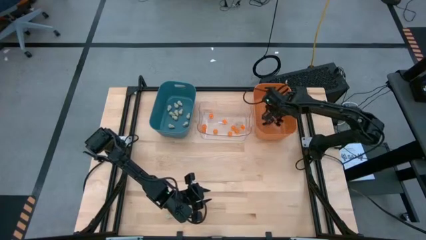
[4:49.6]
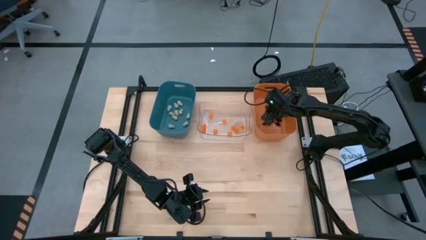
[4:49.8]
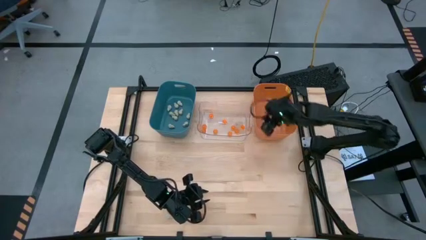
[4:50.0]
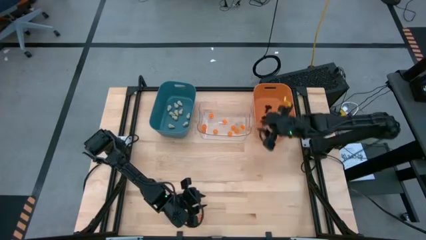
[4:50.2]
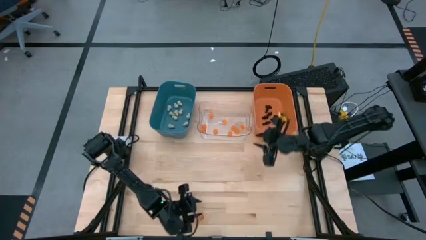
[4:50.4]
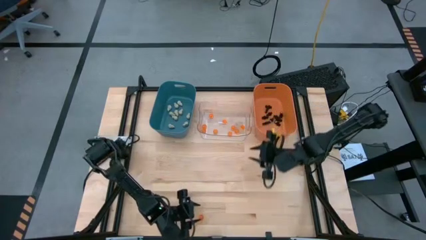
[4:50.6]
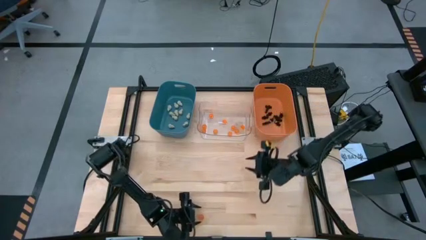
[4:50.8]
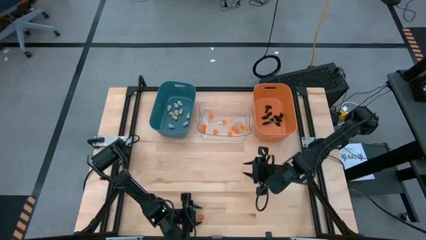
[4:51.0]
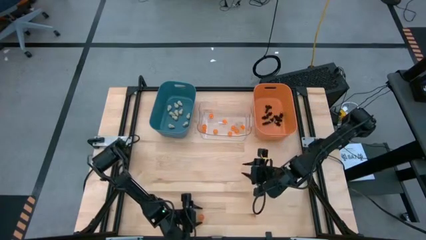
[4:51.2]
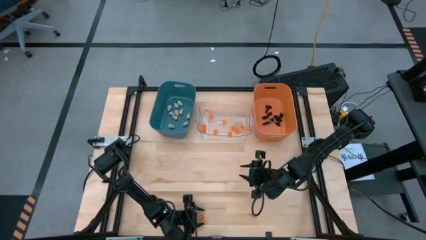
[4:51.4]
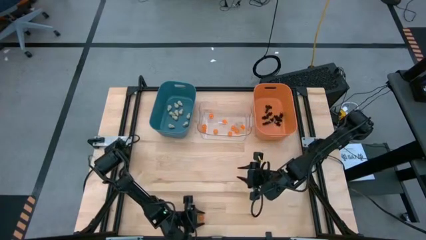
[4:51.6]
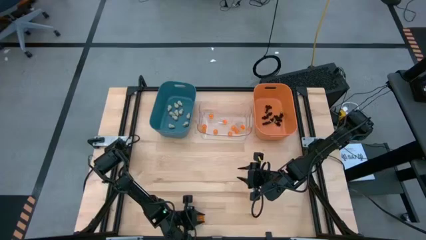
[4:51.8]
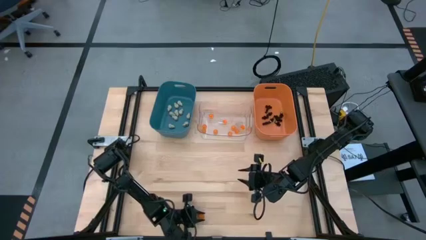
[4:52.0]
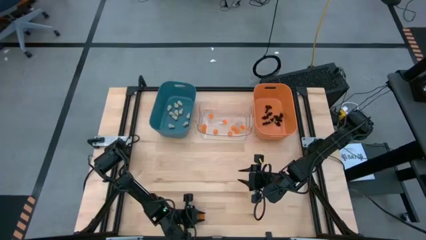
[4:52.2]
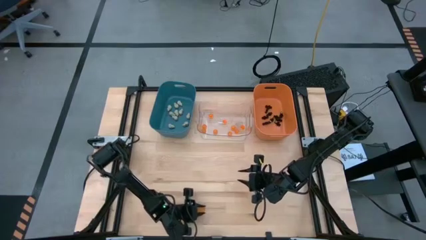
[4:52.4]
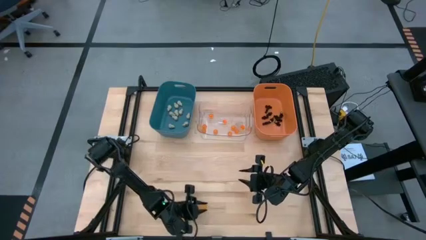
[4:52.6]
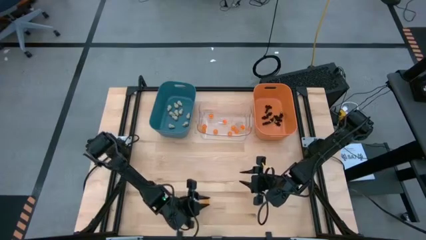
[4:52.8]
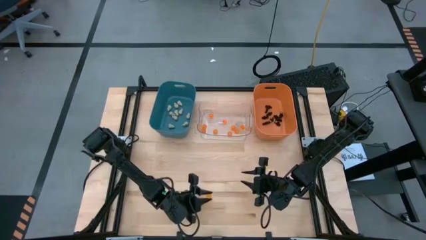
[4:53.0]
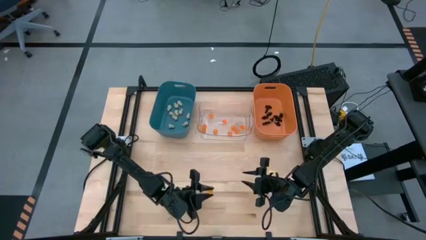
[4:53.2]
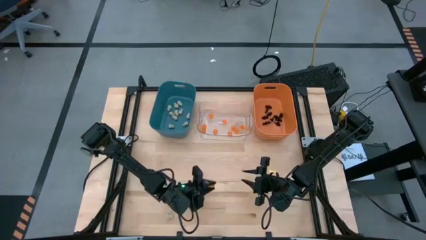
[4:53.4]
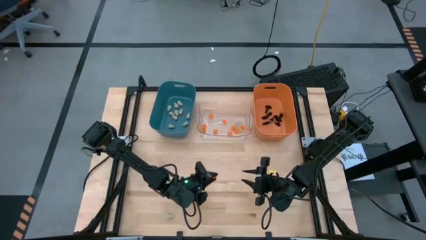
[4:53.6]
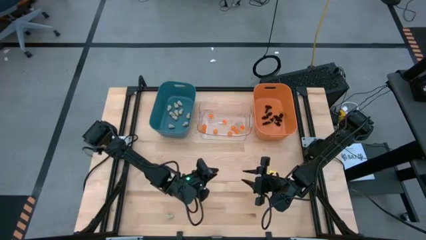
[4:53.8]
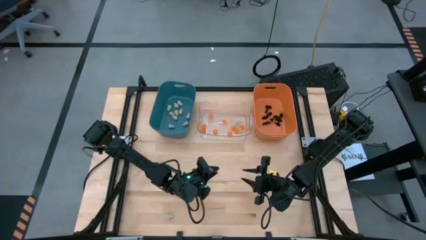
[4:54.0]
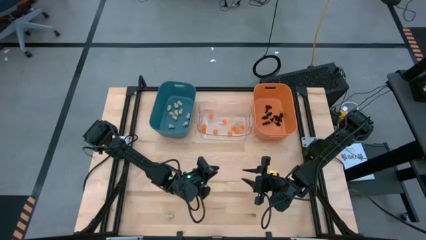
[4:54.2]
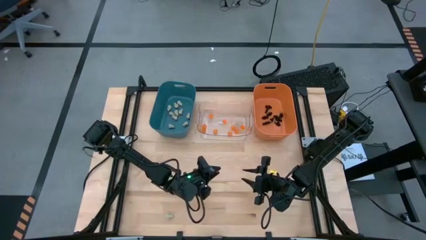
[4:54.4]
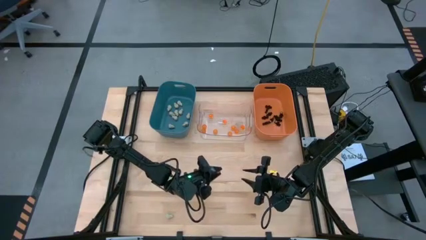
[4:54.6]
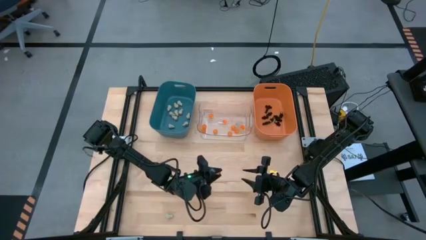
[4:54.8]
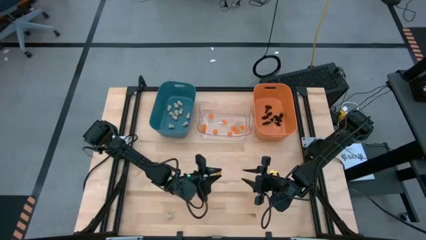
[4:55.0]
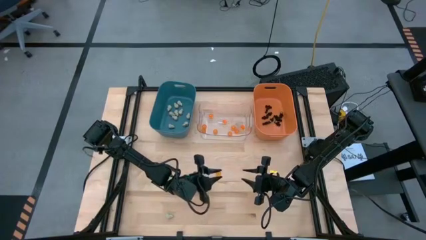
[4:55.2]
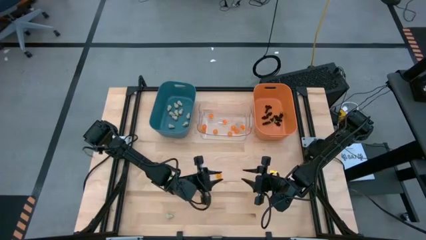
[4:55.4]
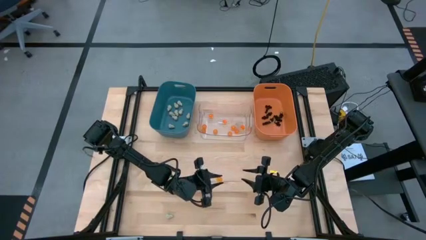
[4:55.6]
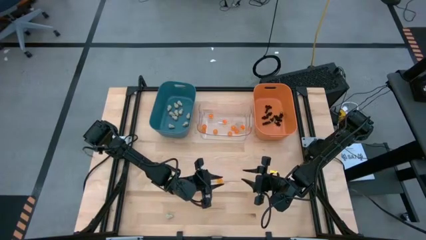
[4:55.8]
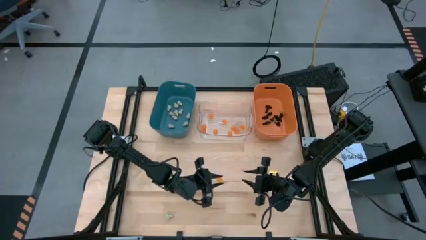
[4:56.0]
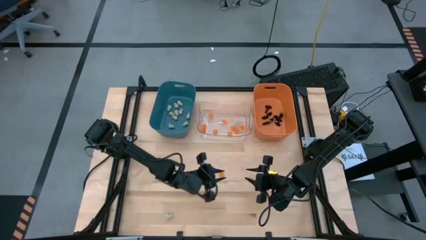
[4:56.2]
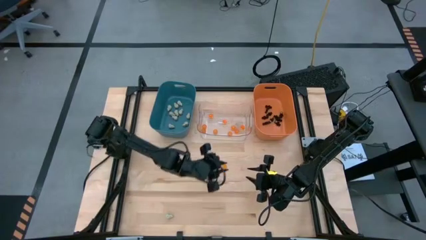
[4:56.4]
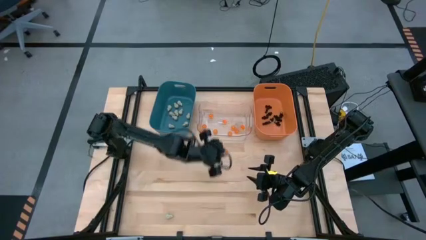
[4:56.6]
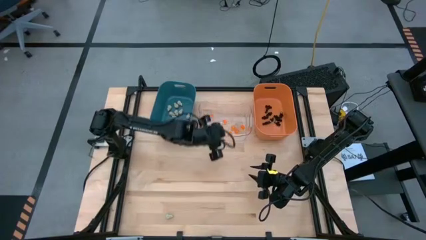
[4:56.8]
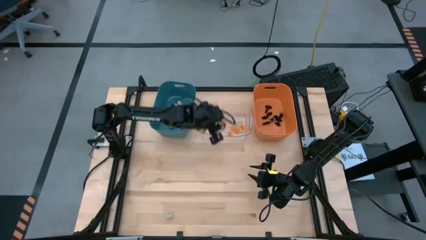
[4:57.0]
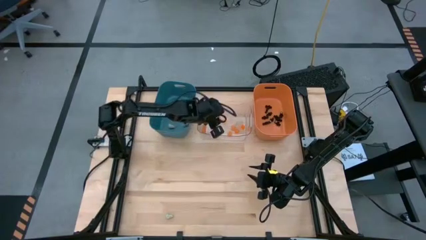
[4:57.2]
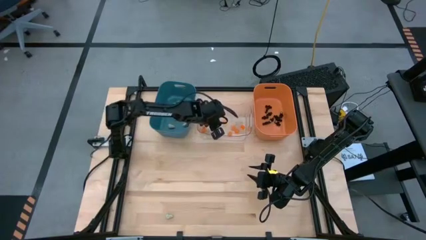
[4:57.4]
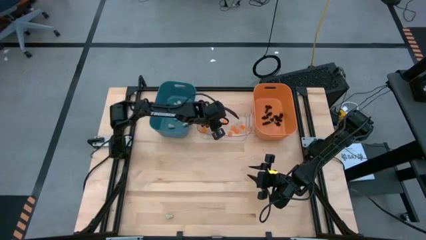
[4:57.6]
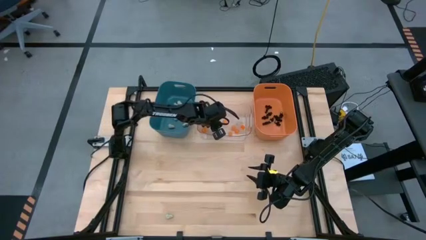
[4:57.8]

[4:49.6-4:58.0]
Task: Sort Halloween decoration
Put the orange pumpkin toy into the transparent bin

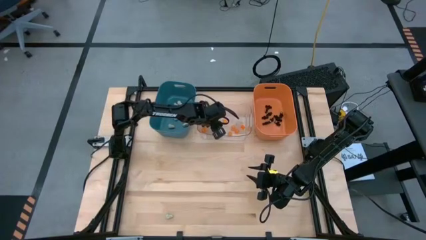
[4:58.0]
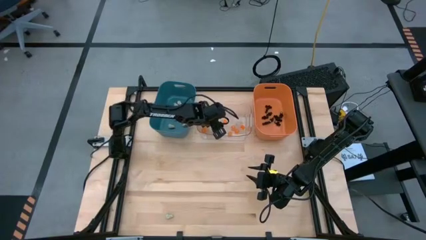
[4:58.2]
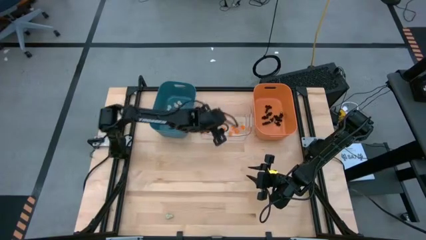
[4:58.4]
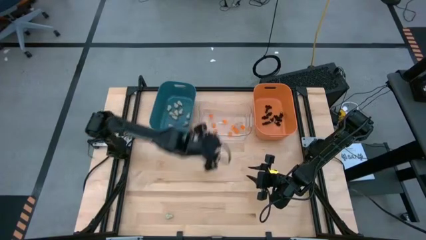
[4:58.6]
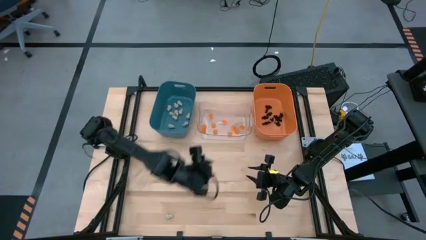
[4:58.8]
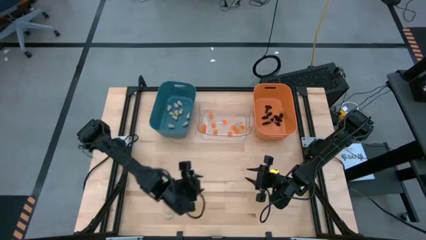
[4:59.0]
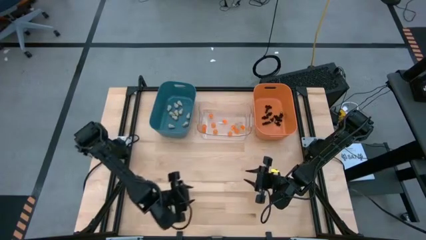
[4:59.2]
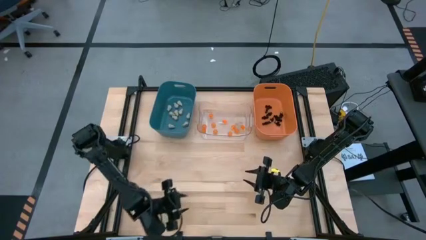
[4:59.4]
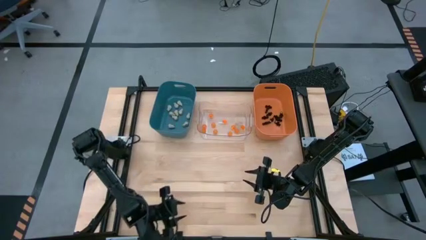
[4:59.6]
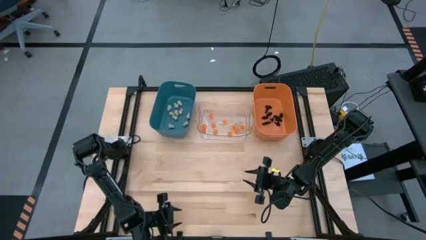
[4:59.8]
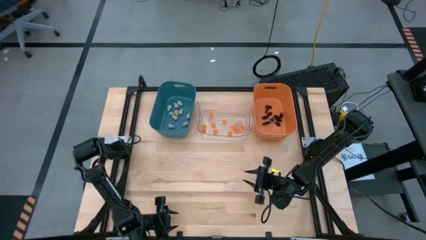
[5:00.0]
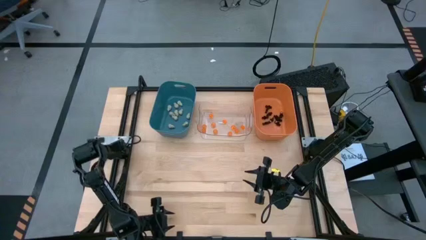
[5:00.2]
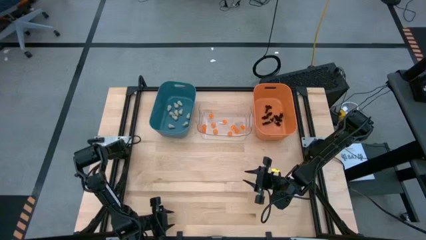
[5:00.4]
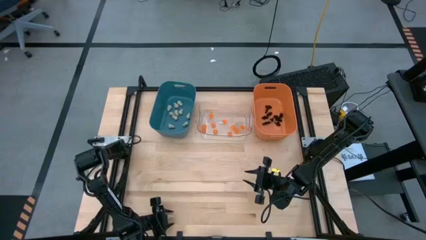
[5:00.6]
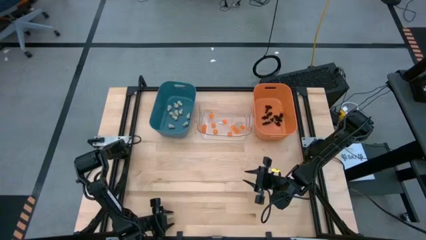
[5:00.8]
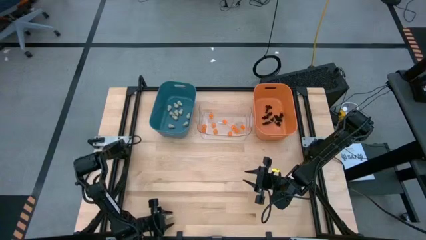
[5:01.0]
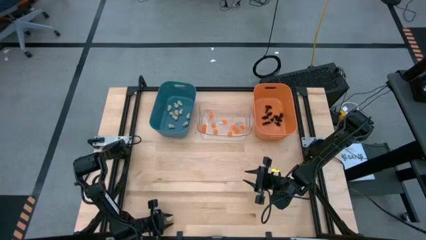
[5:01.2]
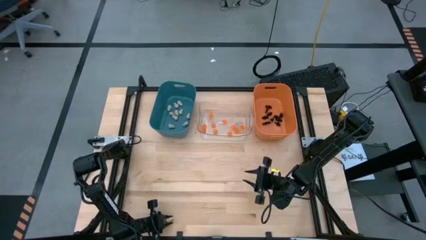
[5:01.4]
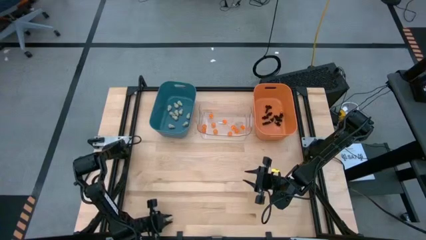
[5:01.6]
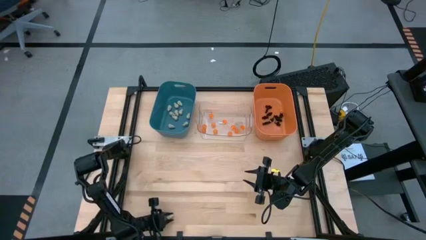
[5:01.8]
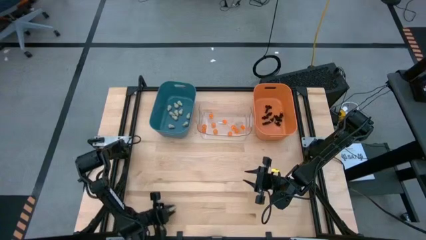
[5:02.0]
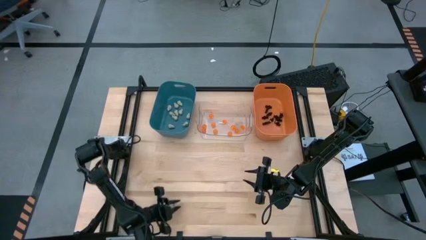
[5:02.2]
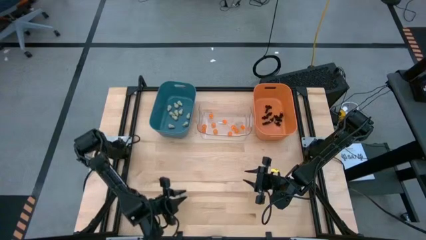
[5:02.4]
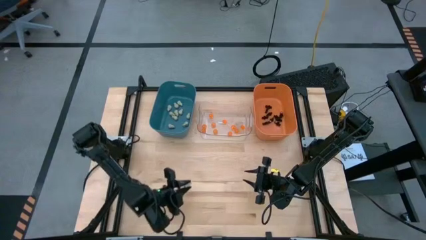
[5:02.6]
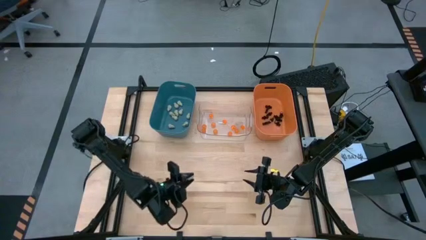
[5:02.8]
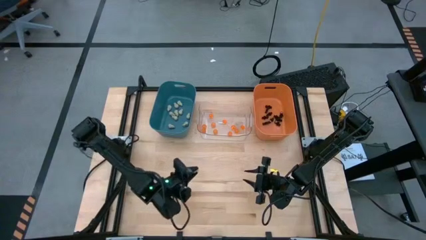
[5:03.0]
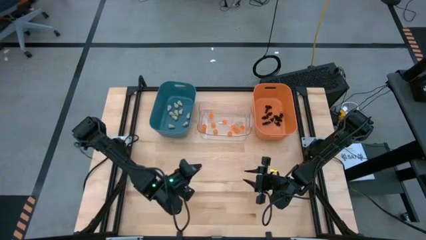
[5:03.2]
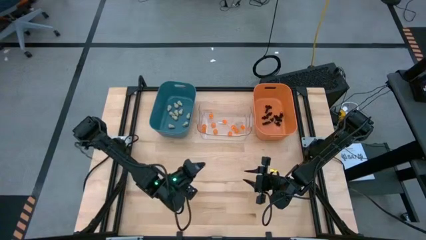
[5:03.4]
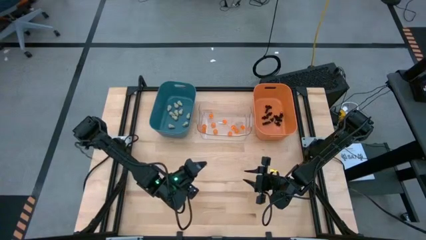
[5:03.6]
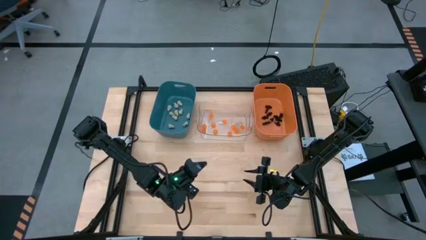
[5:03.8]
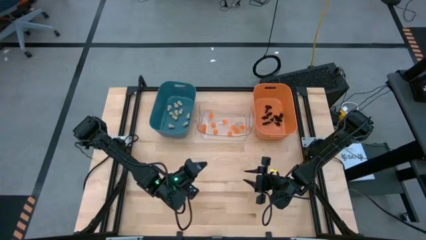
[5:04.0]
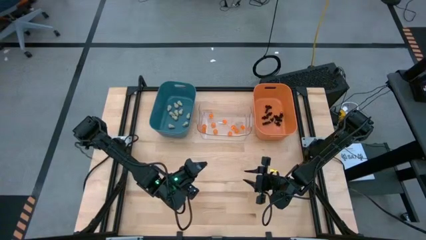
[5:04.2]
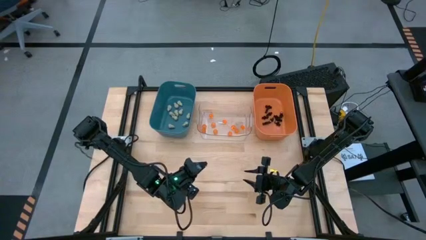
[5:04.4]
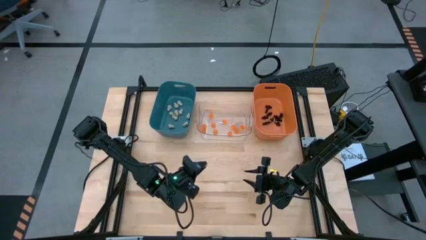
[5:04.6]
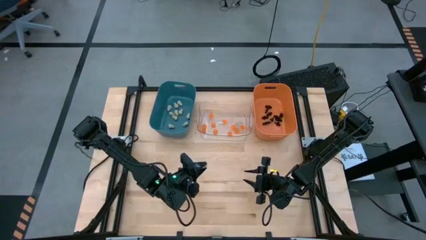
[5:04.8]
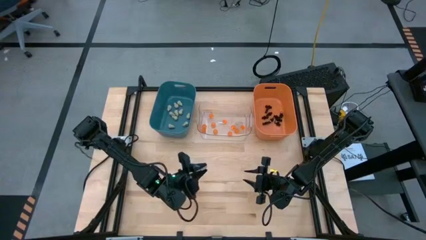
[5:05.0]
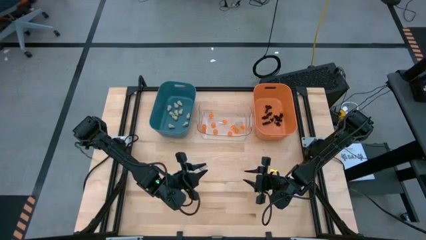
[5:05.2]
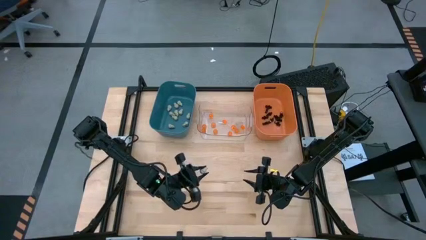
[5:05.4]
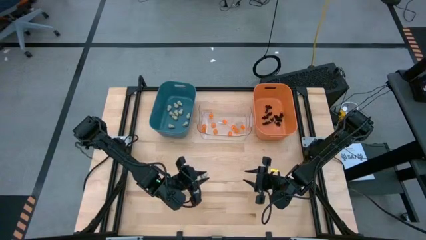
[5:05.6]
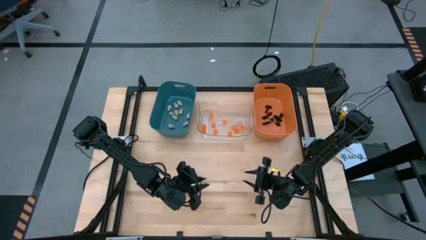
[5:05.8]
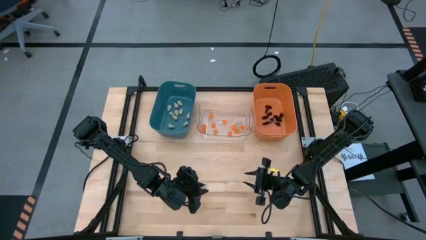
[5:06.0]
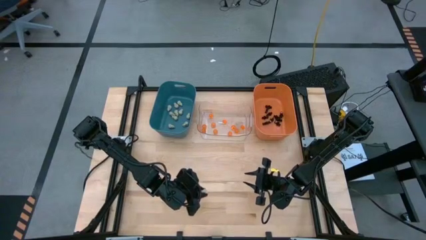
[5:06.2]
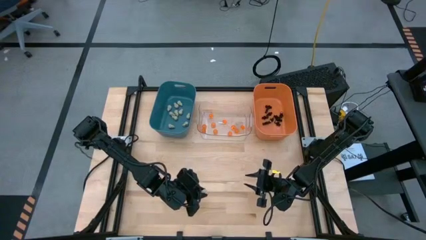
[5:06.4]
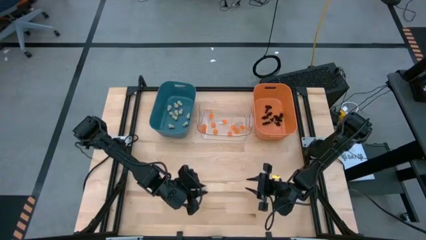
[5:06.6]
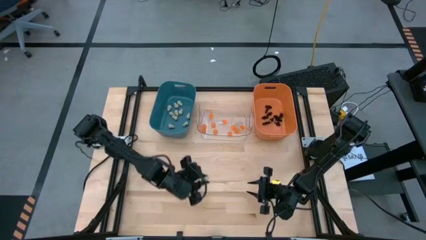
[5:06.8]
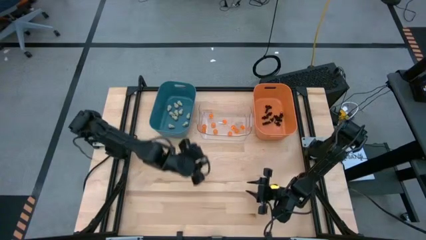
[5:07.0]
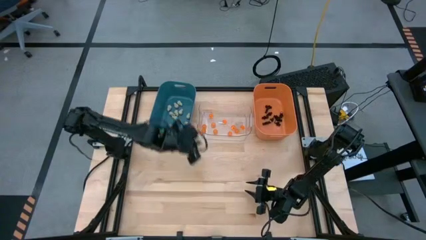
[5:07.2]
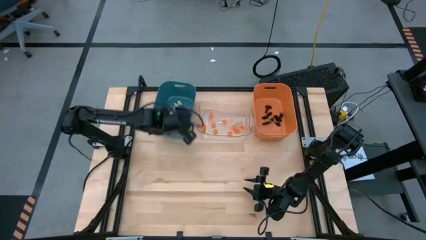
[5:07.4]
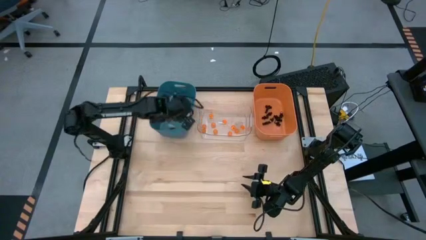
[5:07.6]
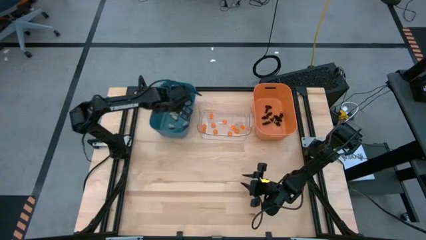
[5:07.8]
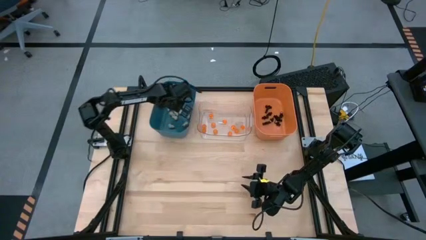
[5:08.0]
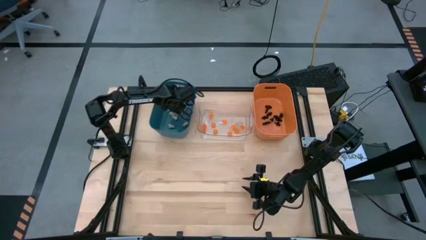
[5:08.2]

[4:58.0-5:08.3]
Put the white skull toy into the blue bin
